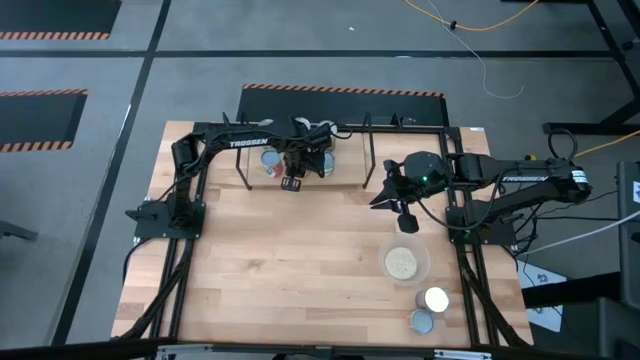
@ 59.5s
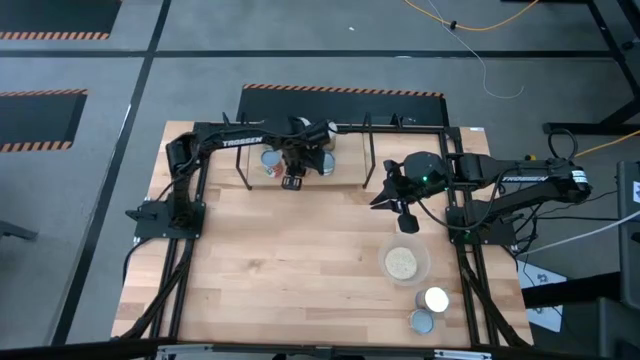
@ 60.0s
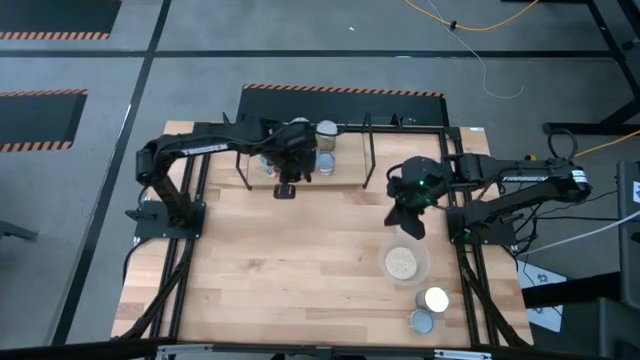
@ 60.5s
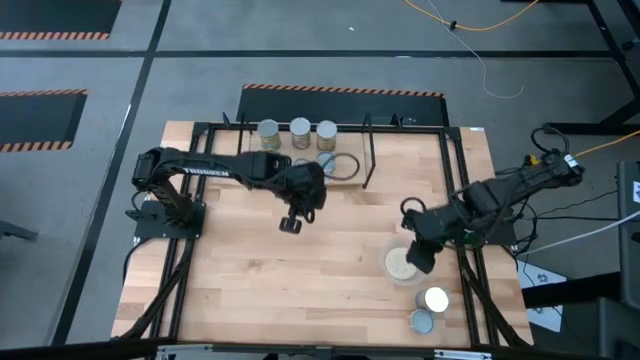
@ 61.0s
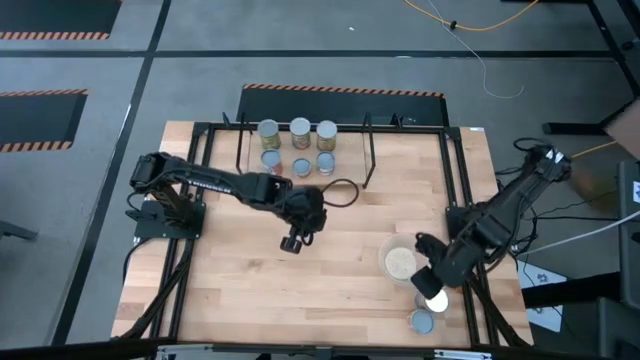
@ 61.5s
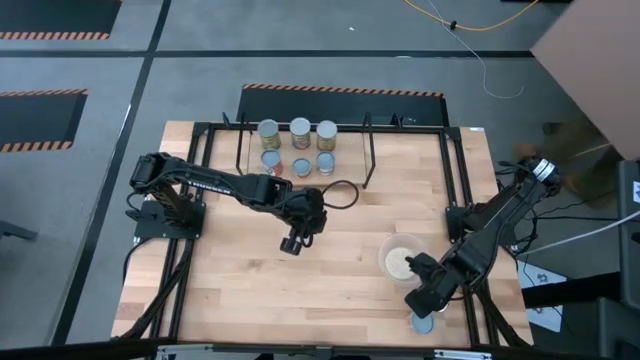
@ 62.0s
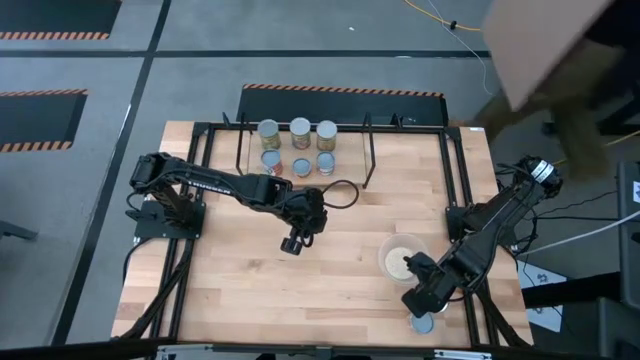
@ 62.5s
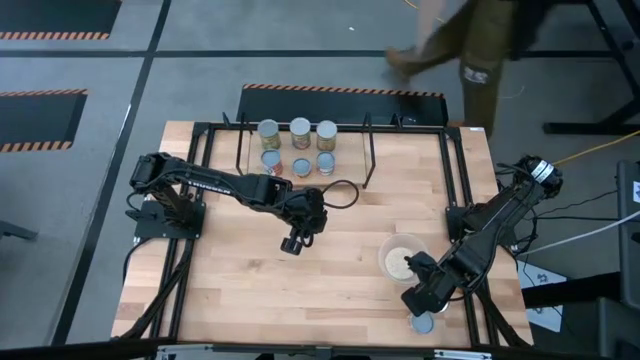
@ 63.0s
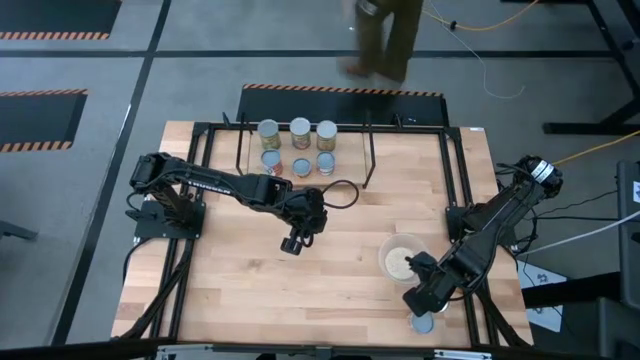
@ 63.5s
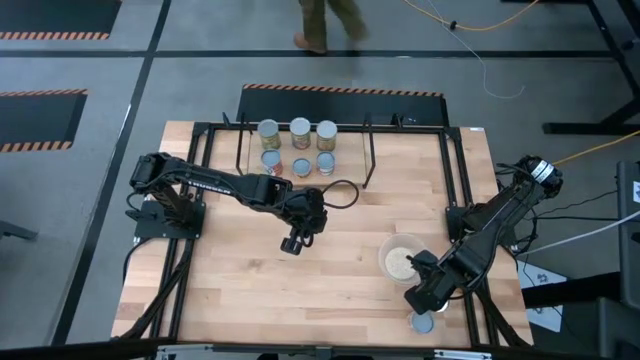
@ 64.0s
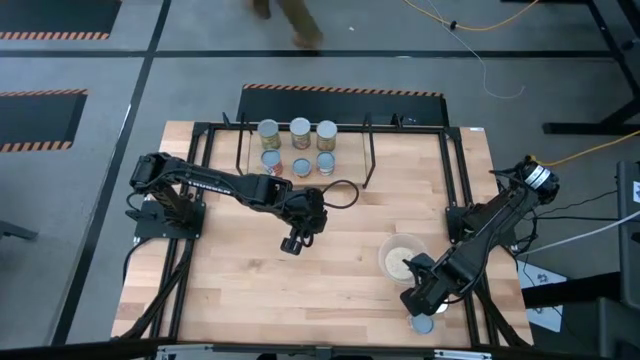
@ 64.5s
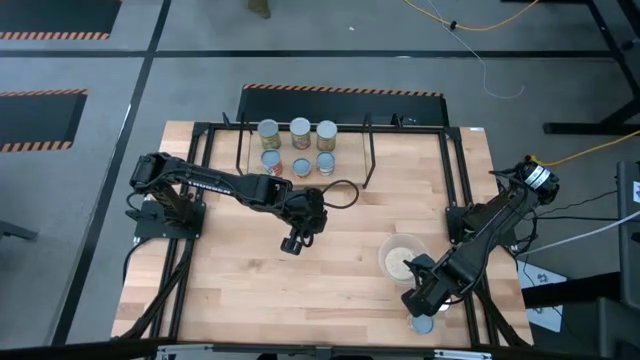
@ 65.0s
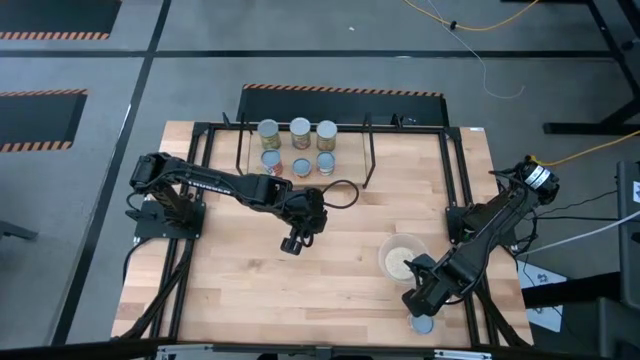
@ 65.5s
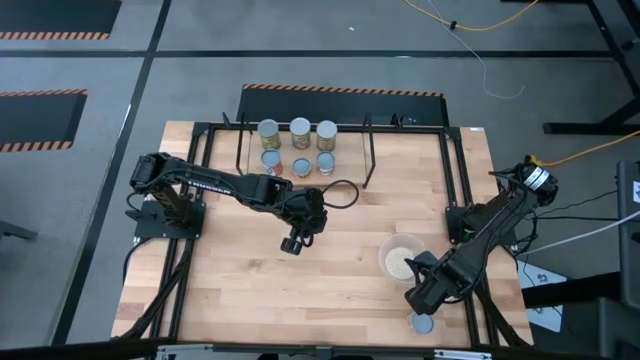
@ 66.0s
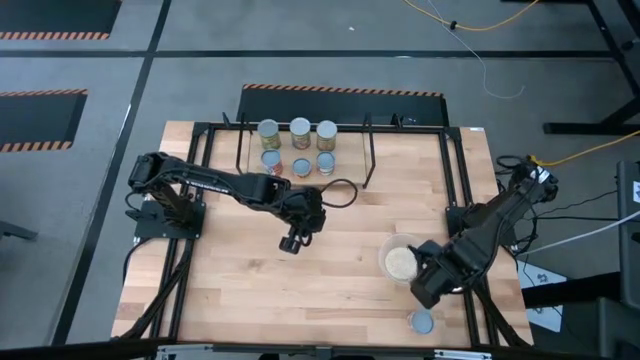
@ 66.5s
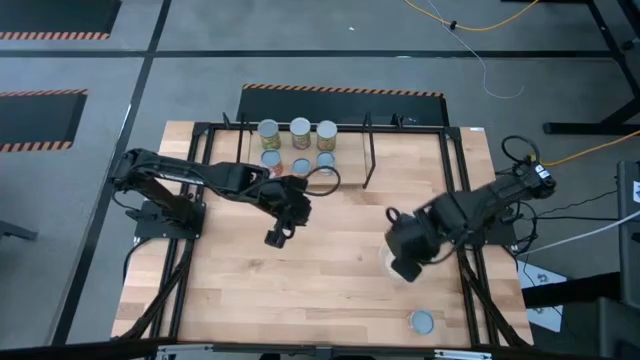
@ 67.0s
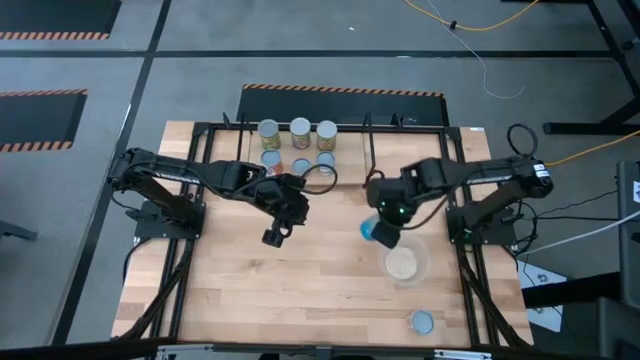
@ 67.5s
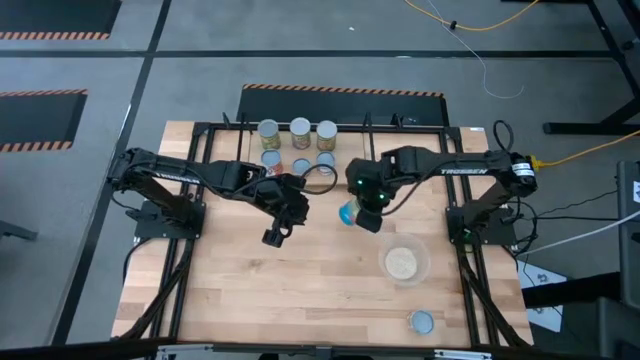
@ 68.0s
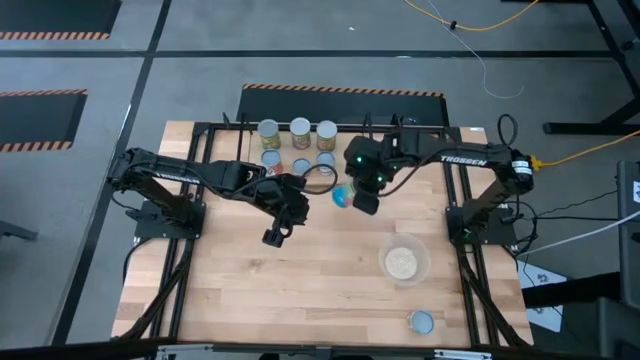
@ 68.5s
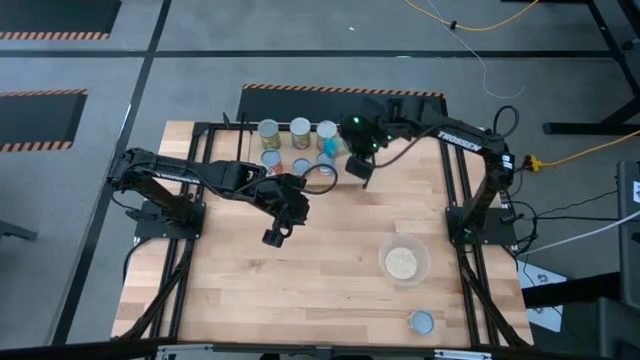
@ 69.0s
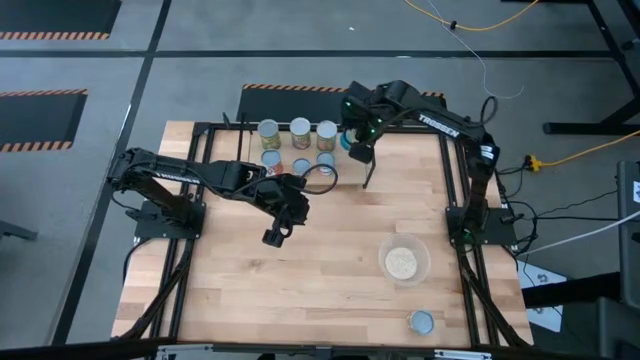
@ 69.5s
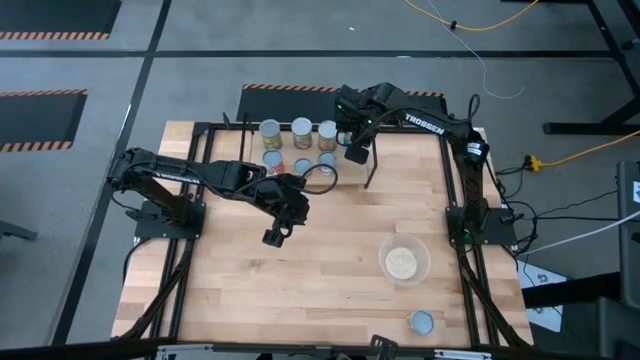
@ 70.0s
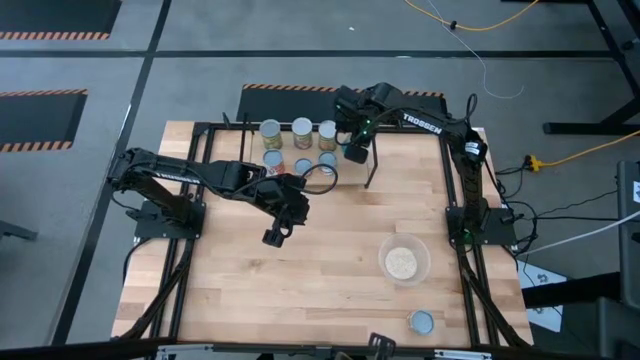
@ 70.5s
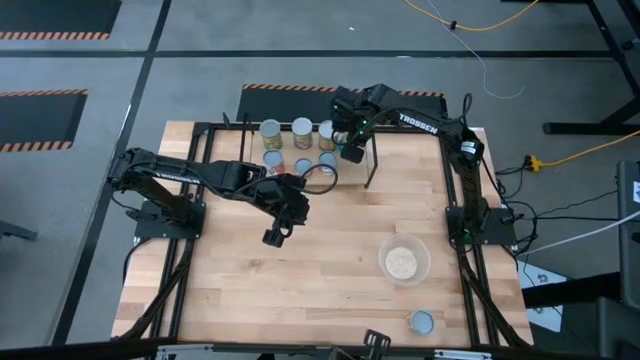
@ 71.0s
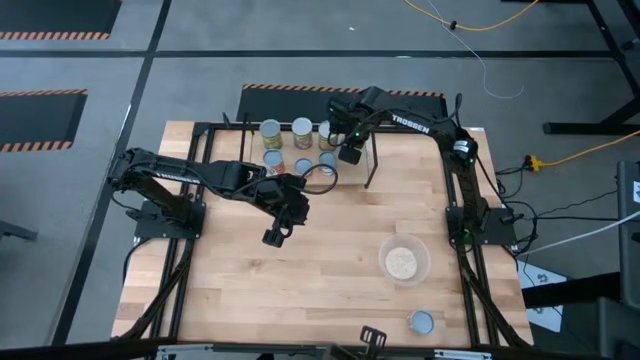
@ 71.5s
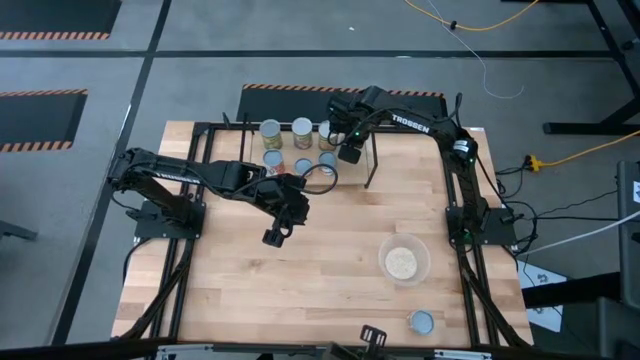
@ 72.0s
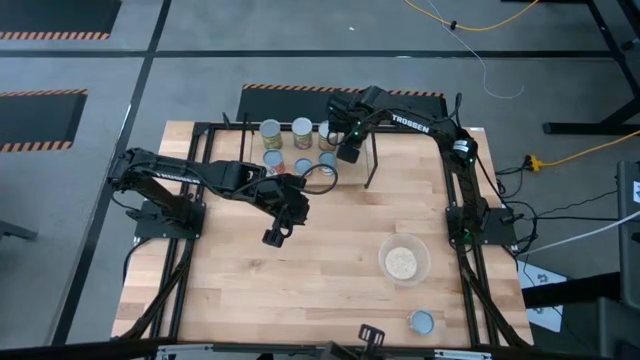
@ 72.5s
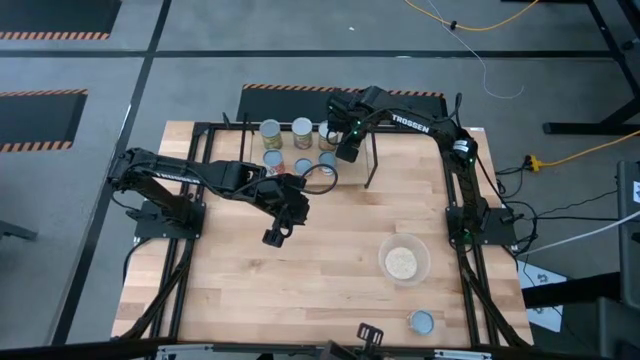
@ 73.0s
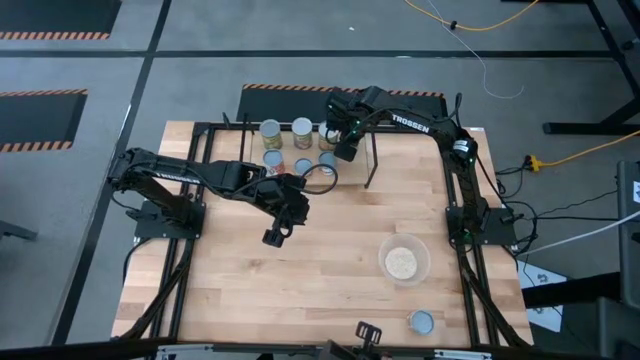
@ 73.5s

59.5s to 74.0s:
Task: Pick and place cans onto a shelf
Put the canned tomatoes on the shelf

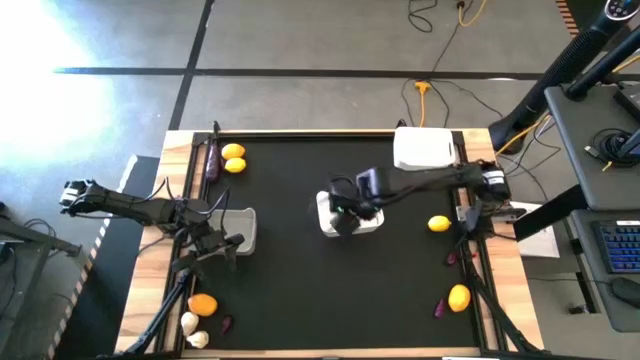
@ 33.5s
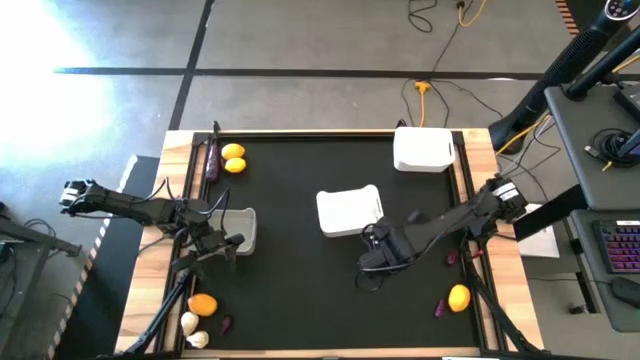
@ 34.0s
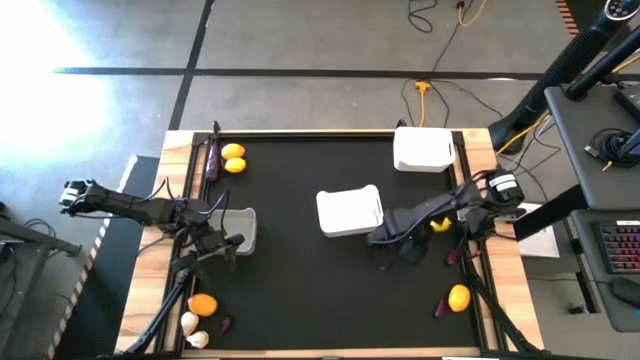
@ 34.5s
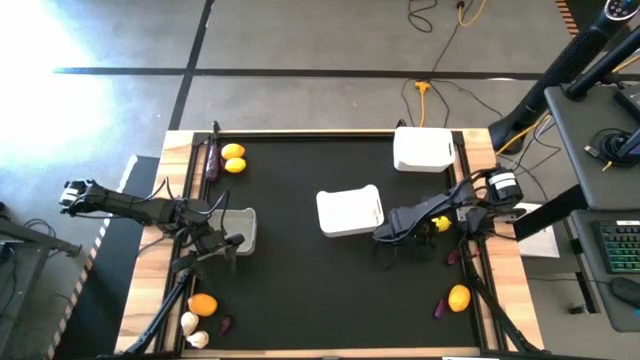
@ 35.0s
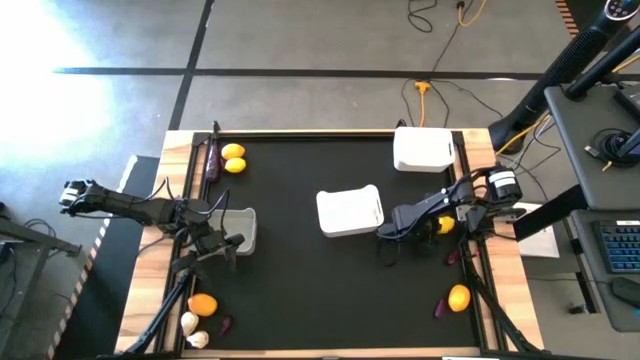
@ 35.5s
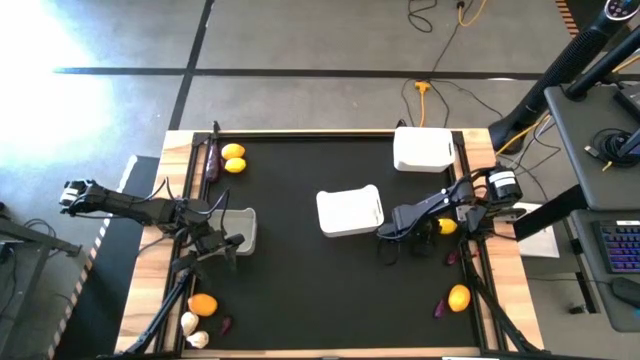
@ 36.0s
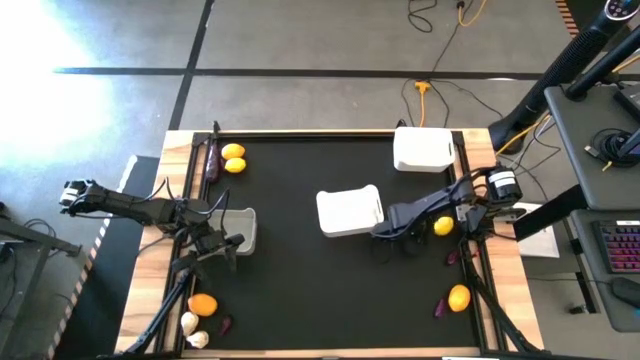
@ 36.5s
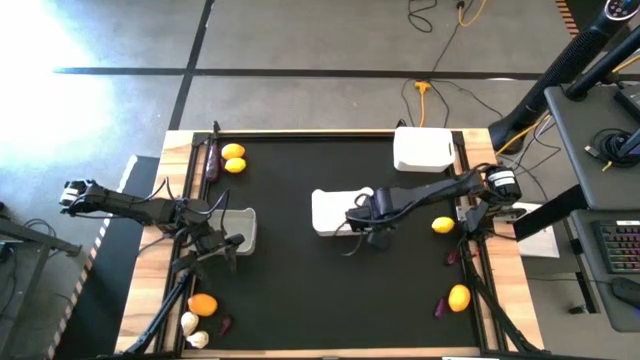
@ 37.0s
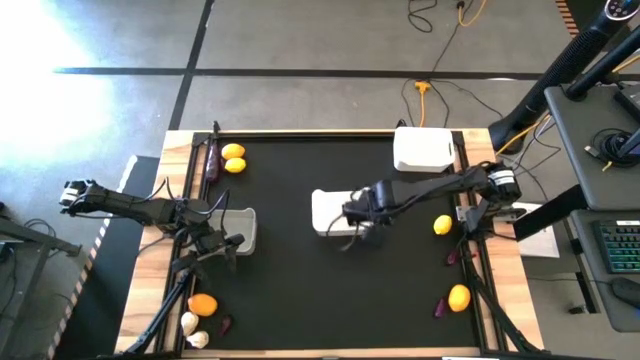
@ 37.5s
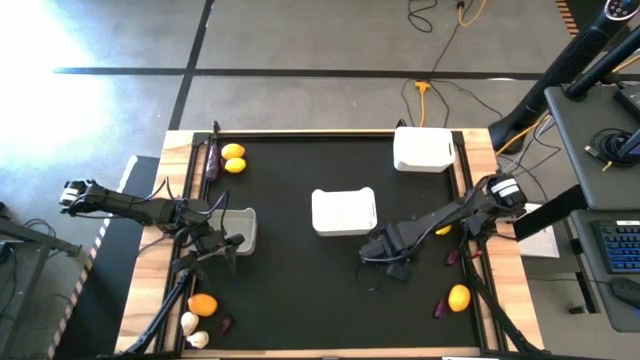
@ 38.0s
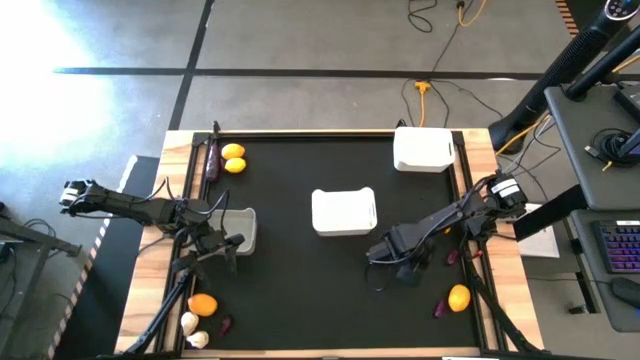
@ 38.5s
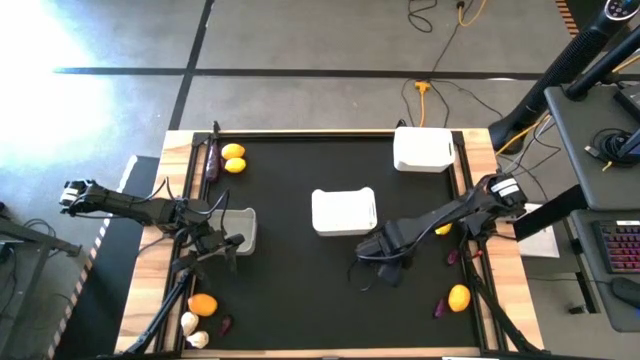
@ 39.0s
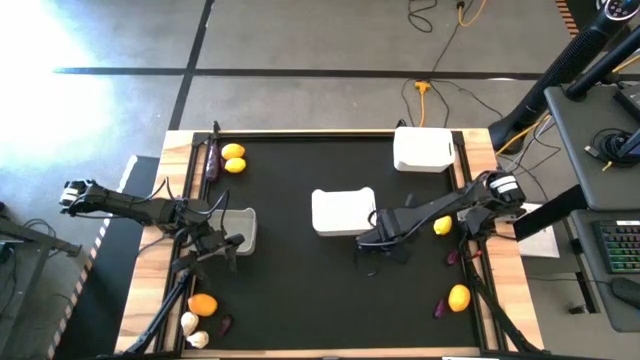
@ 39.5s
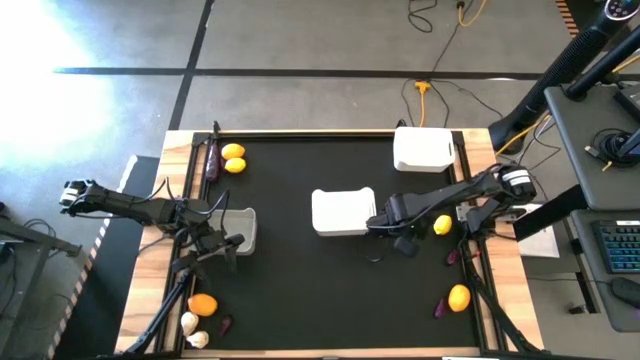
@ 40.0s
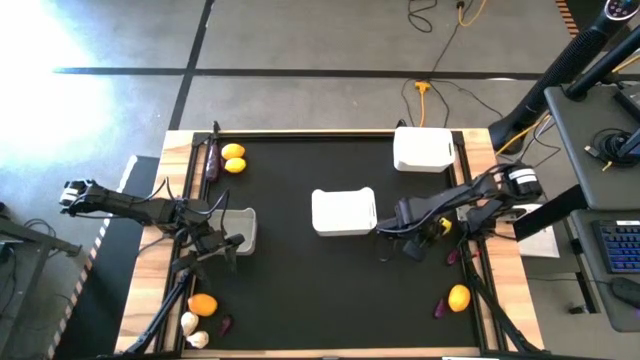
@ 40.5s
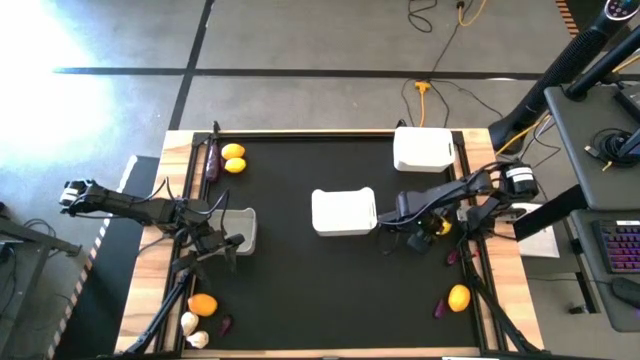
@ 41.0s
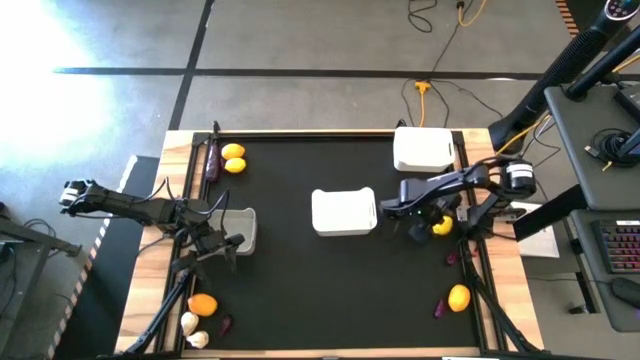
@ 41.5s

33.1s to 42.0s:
Task: Sort produce into baskets
Put the yellow lemon into the top white bin
